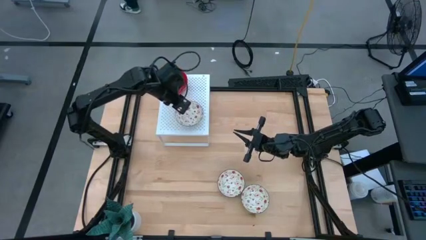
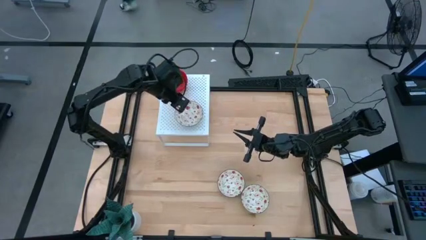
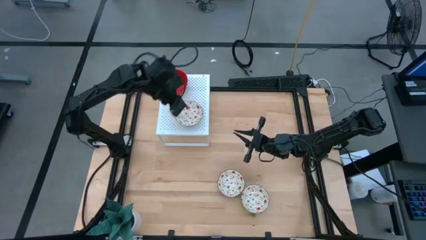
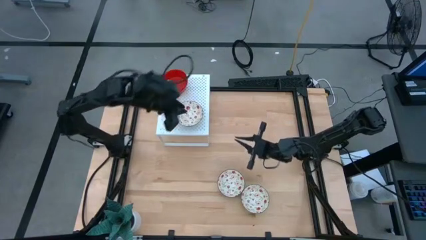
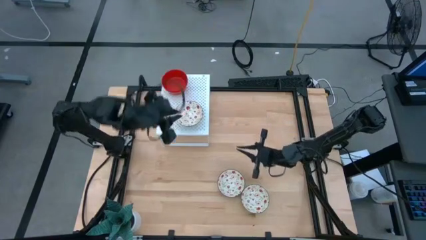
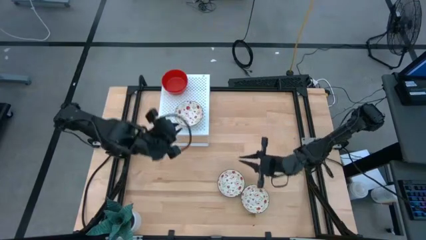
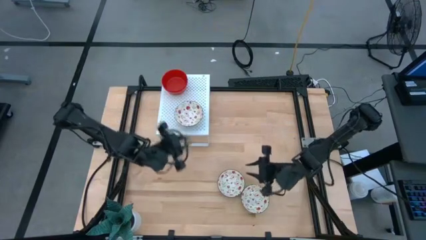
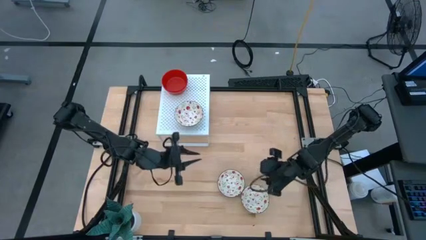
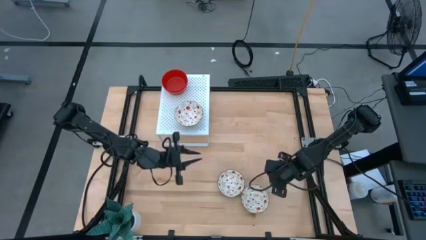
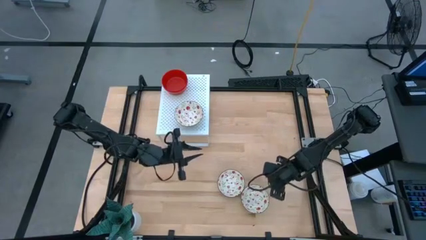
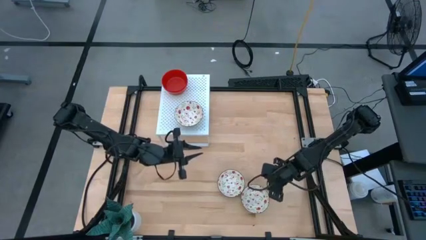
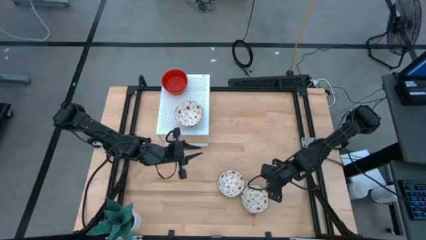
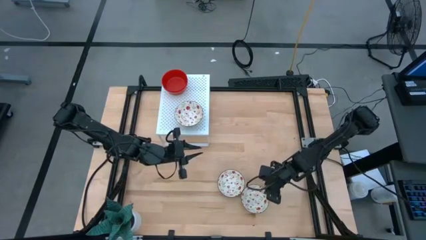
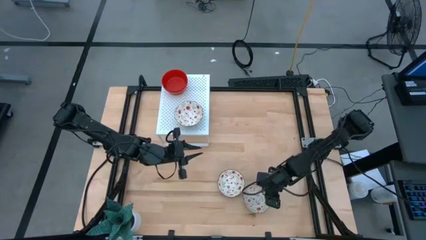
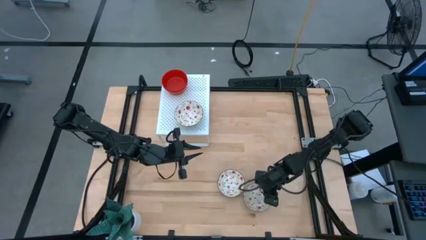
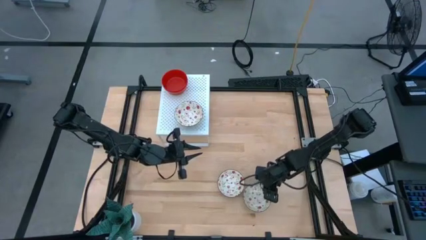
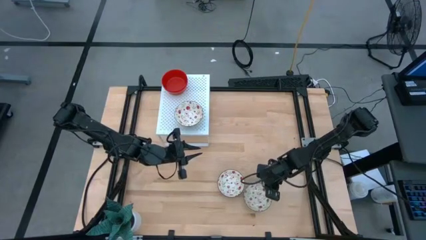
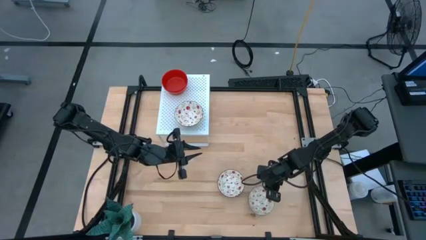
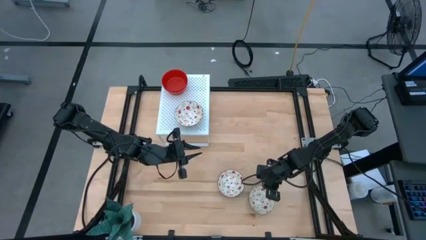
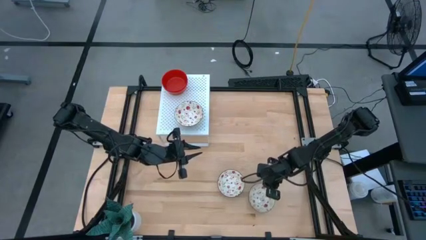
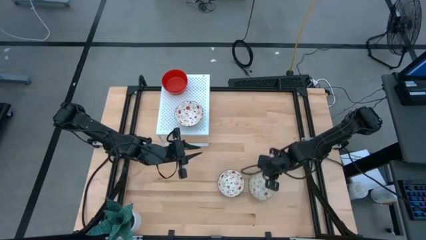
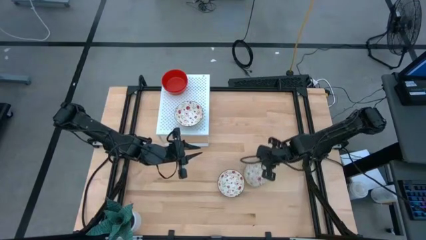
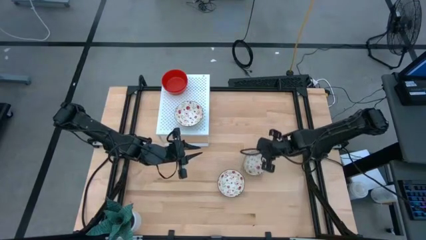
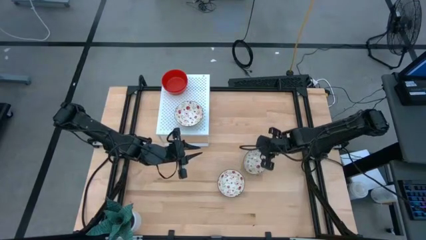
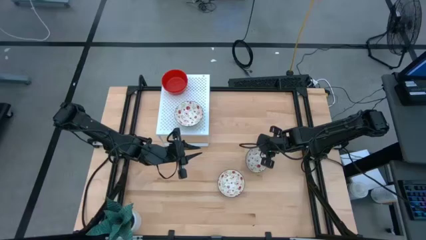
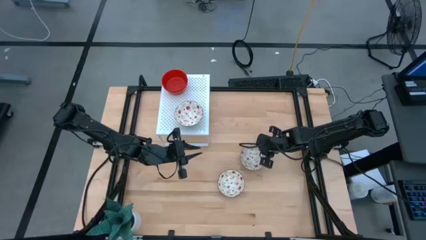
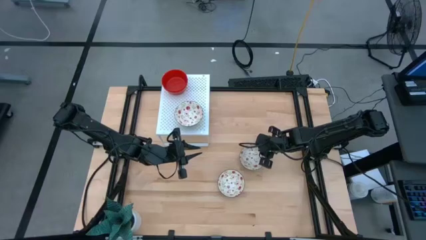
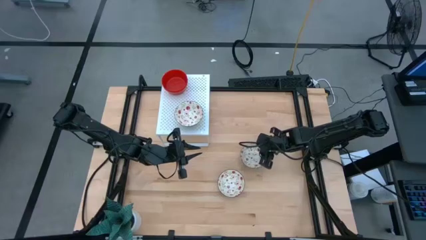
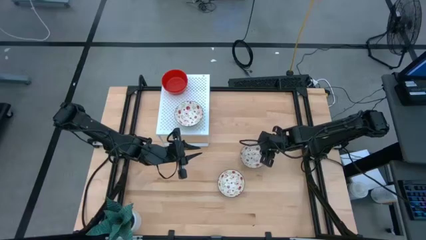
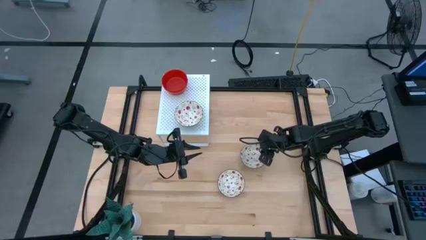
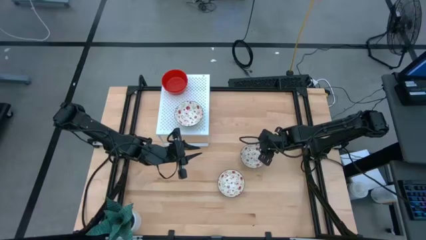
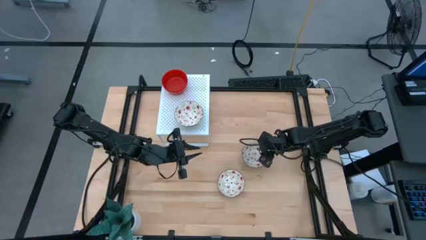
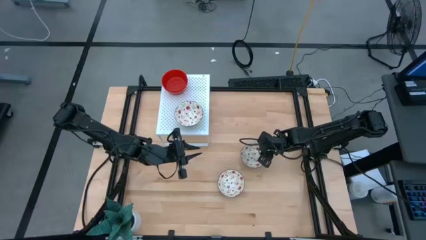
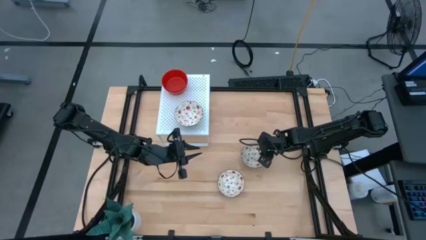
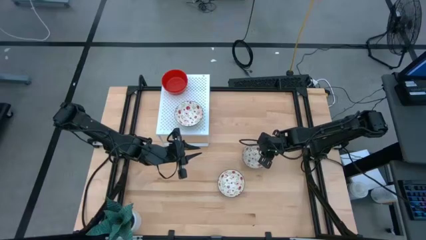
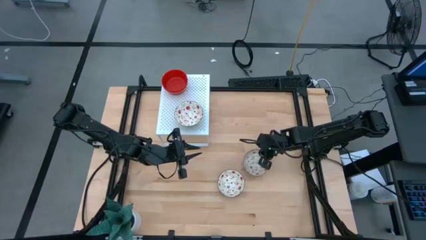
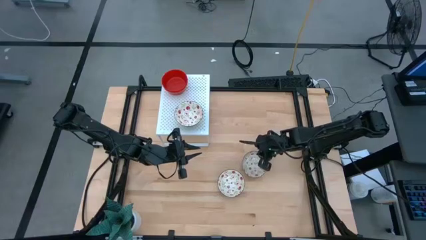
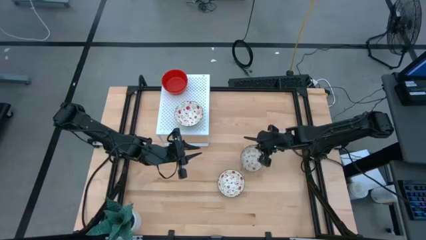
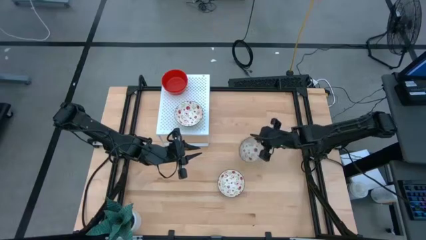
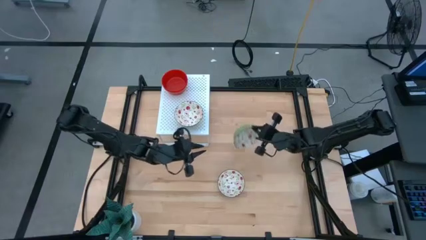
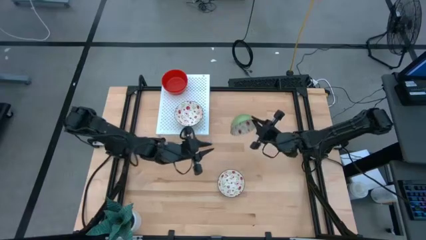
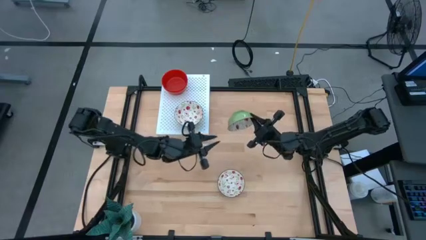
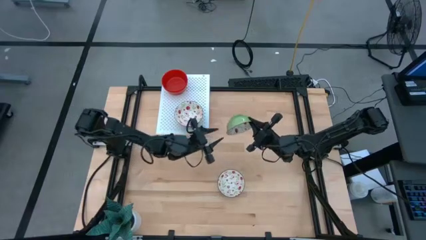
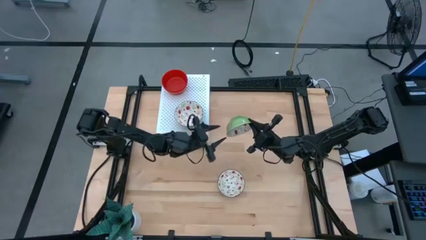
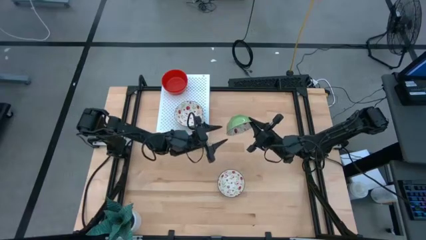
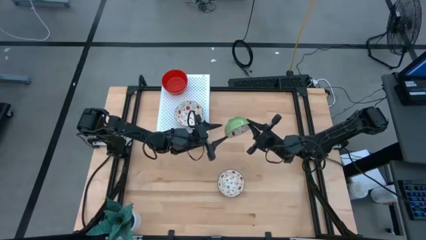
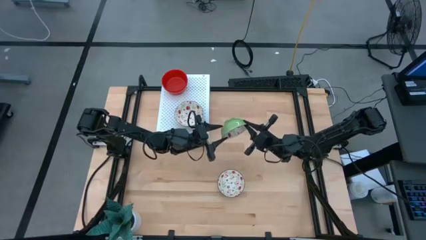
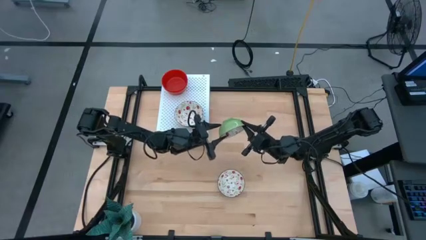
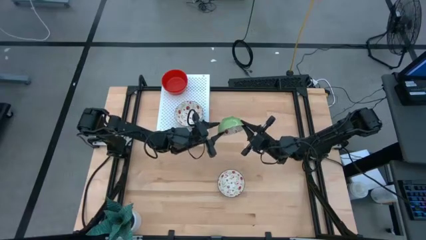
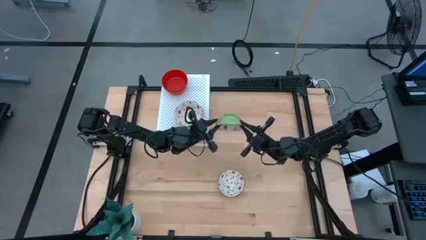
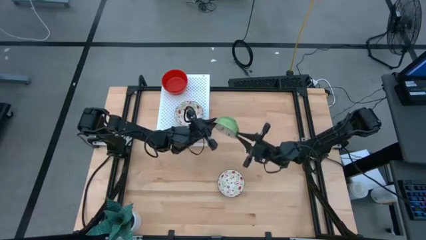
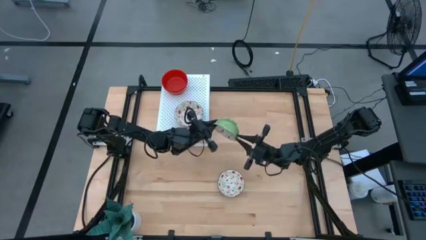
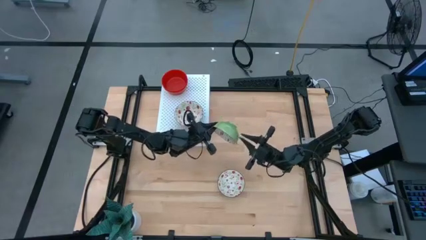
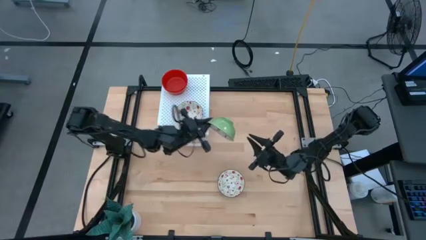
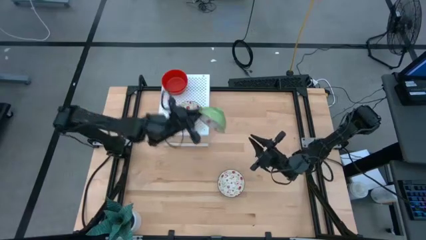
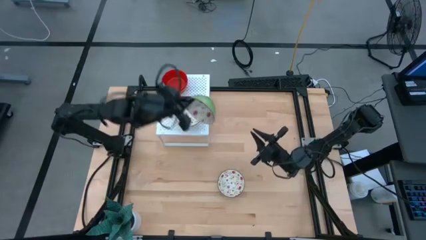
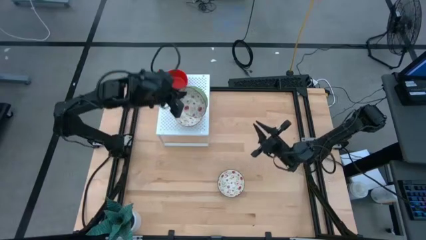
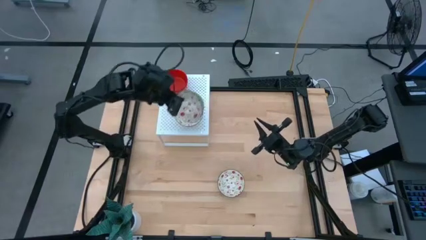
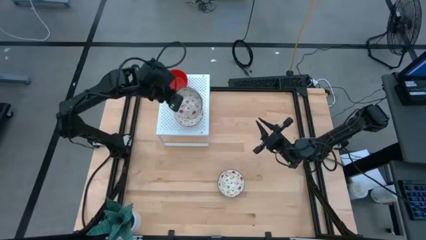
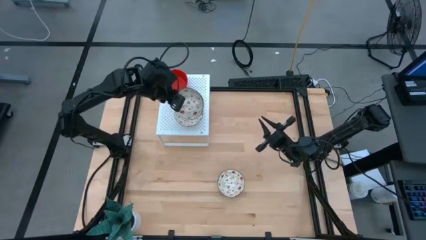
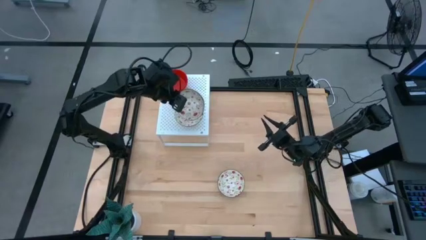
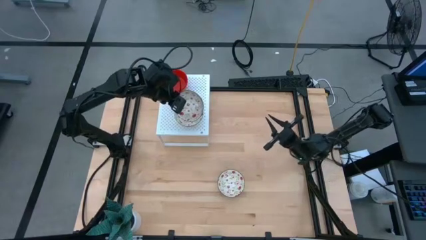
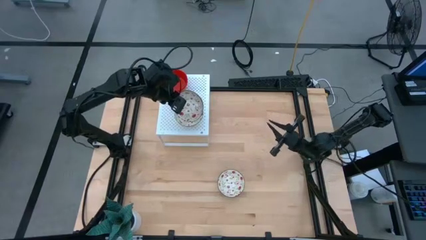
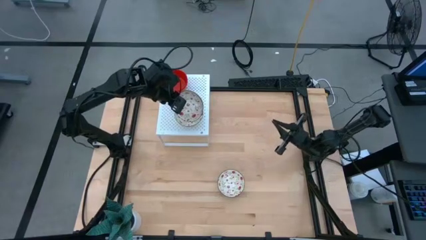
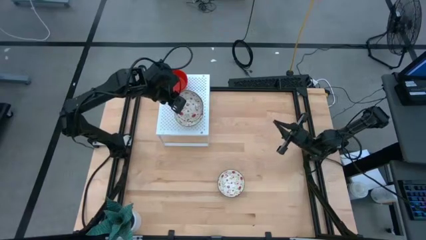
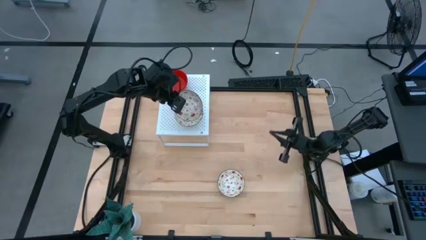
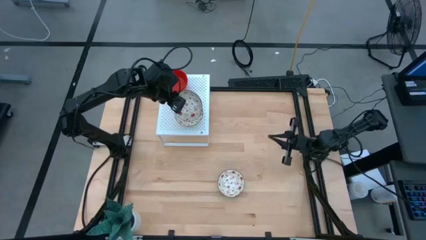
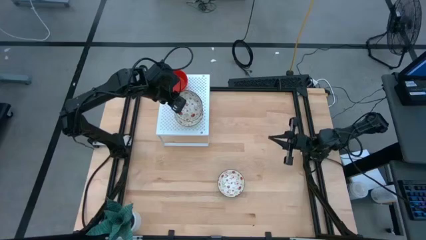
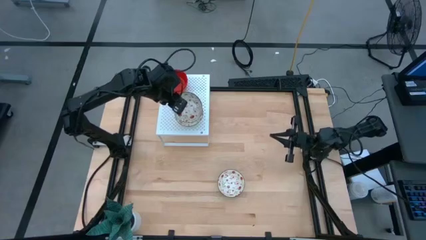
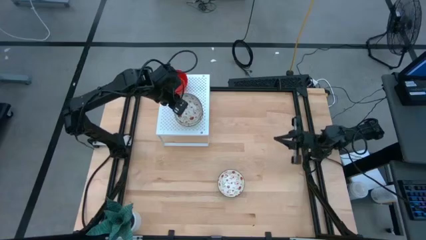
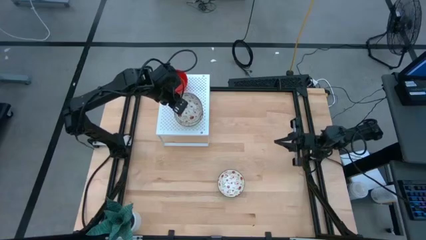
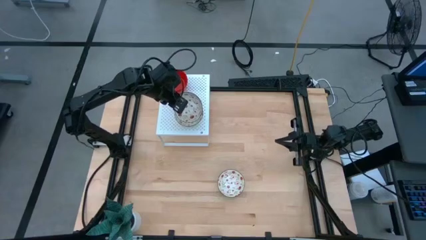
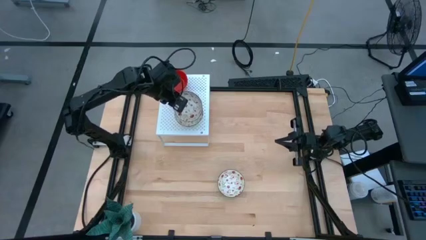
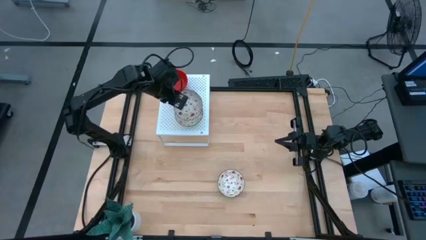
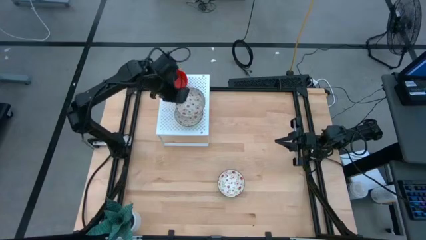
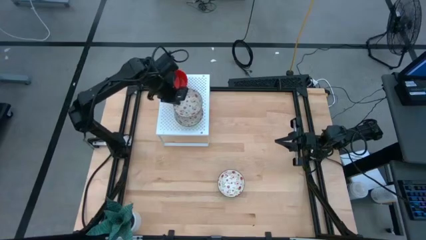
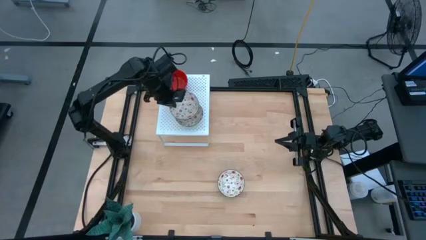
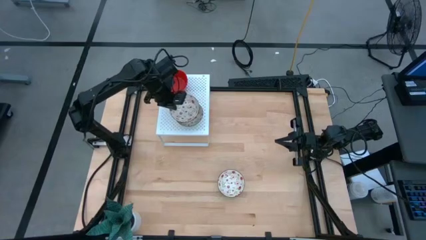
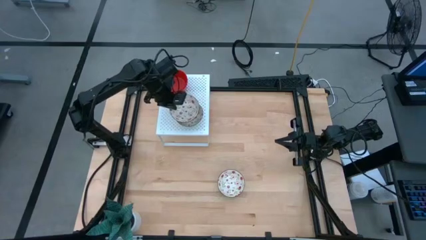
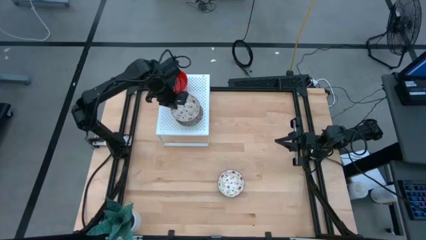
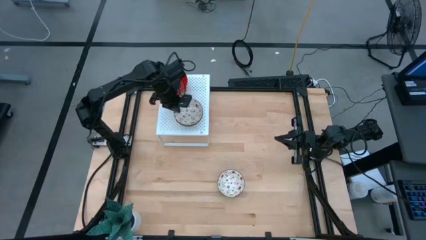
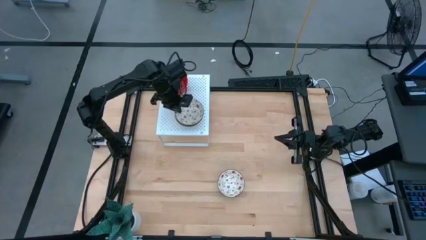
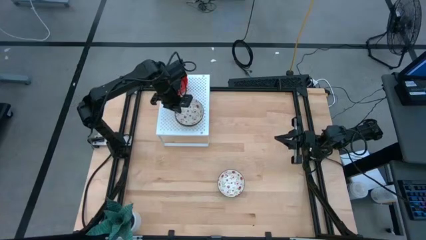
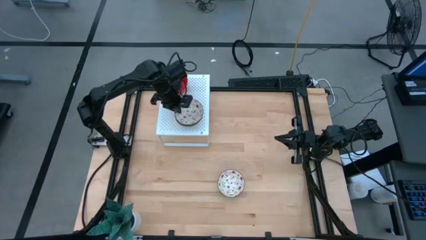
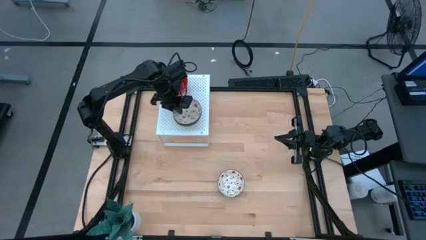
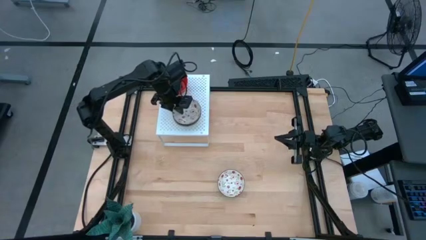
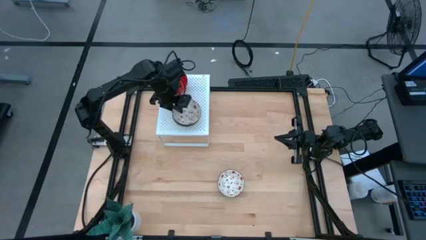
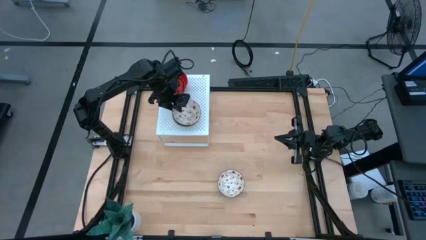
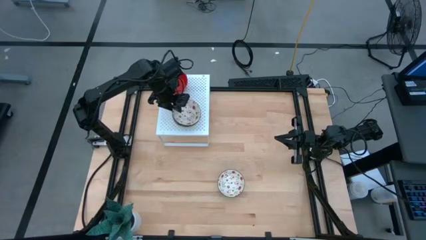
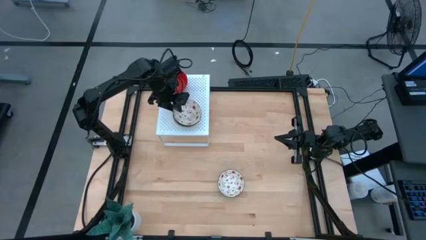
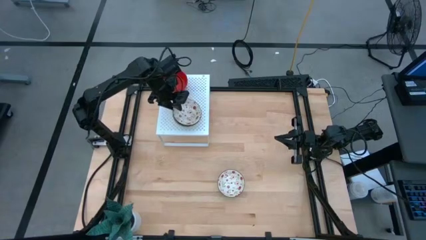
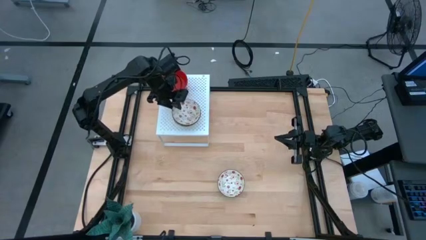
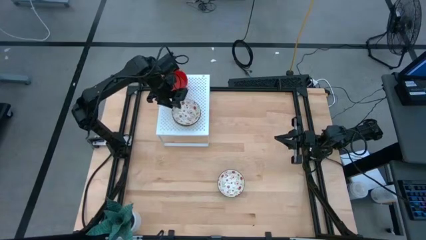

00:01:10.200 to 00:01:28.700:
Task: Pick & Place Mini bowls
Stack the bottom white patterned bowl on top of the white patterned bowl on the shelf
